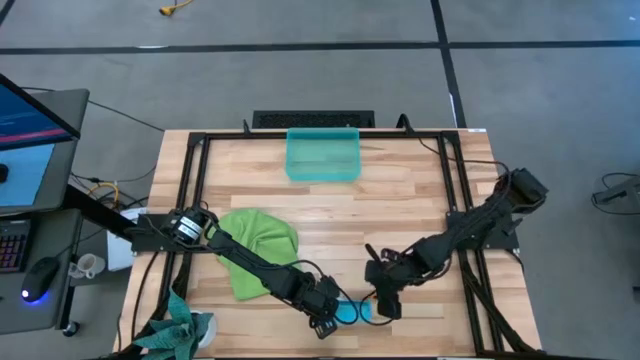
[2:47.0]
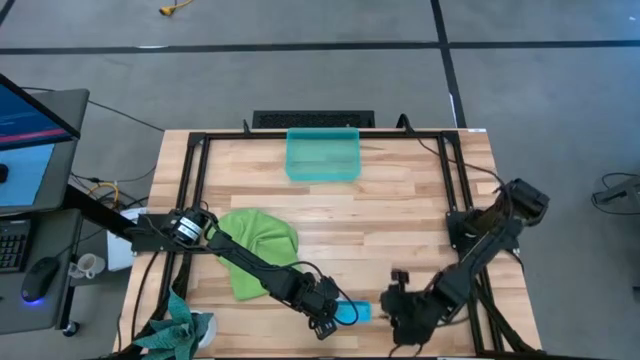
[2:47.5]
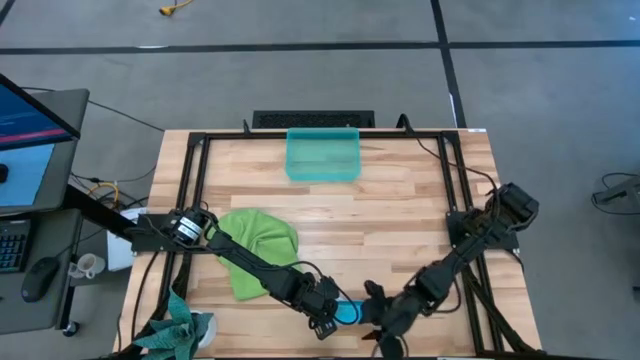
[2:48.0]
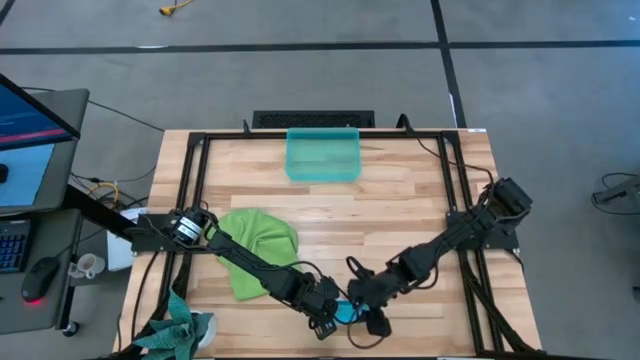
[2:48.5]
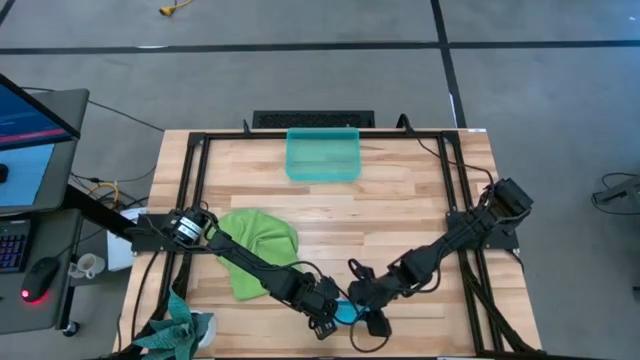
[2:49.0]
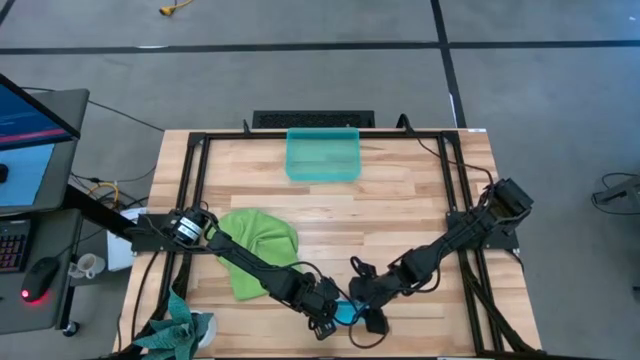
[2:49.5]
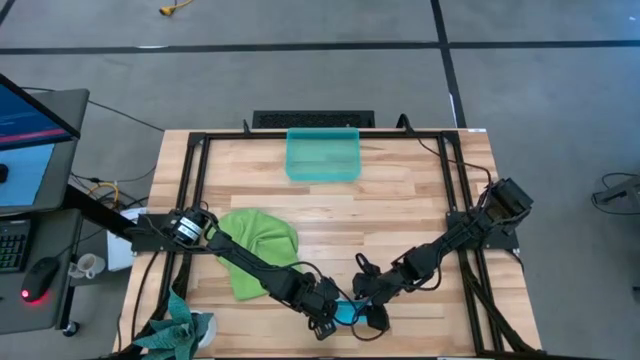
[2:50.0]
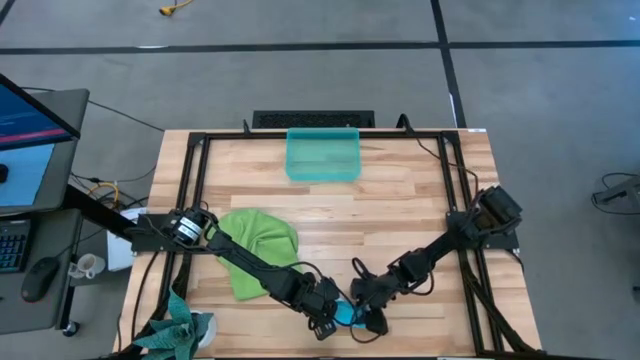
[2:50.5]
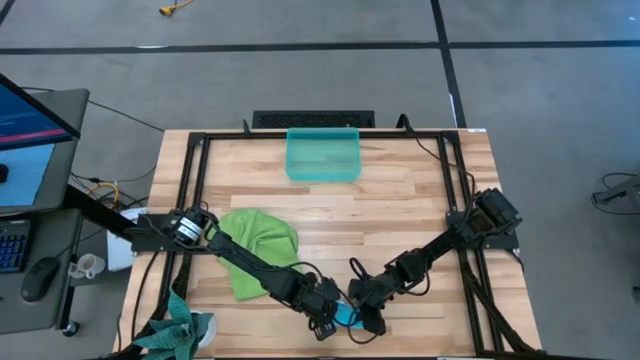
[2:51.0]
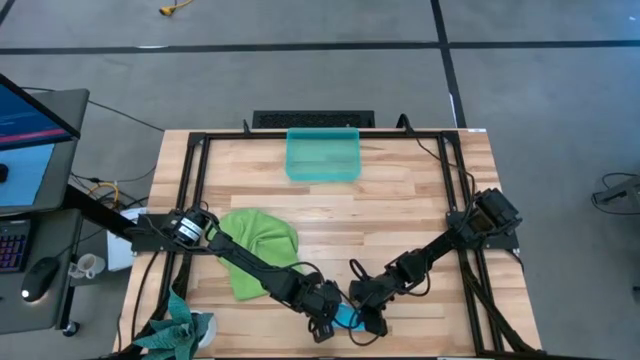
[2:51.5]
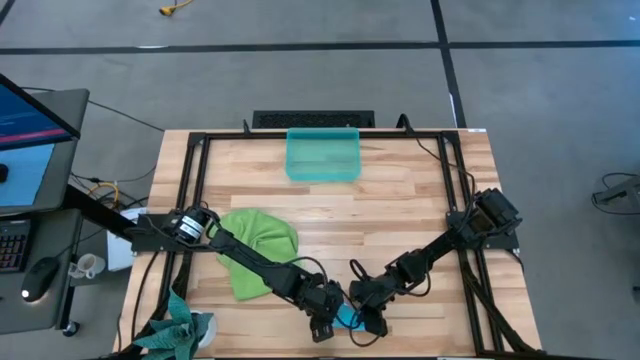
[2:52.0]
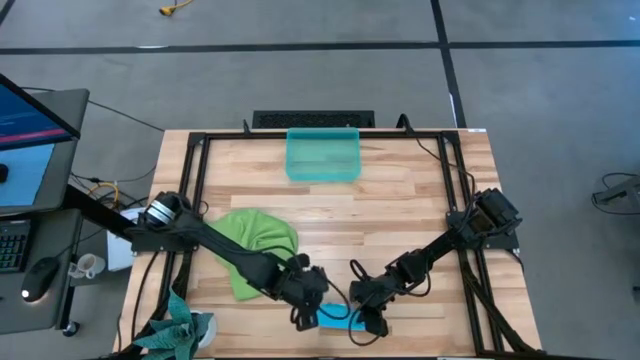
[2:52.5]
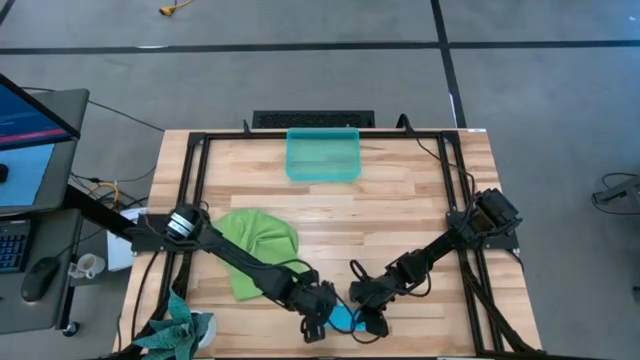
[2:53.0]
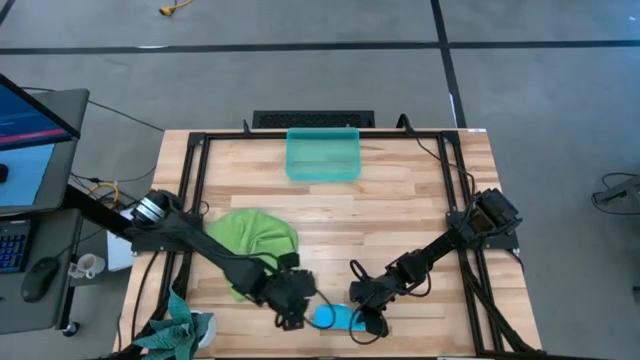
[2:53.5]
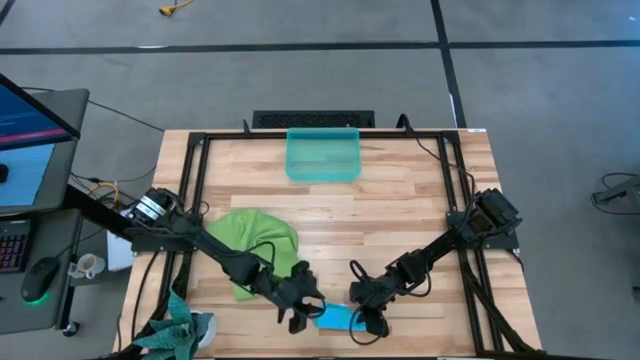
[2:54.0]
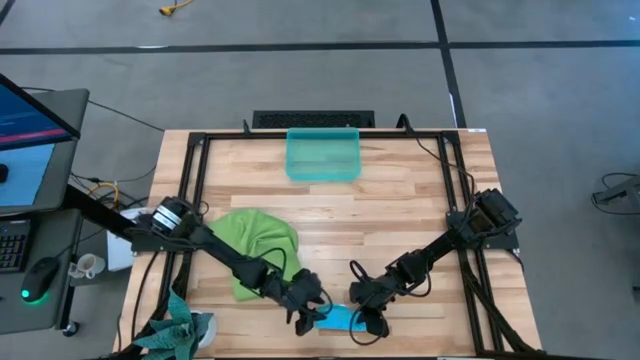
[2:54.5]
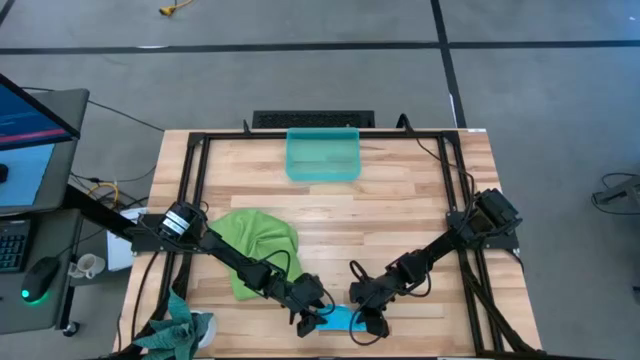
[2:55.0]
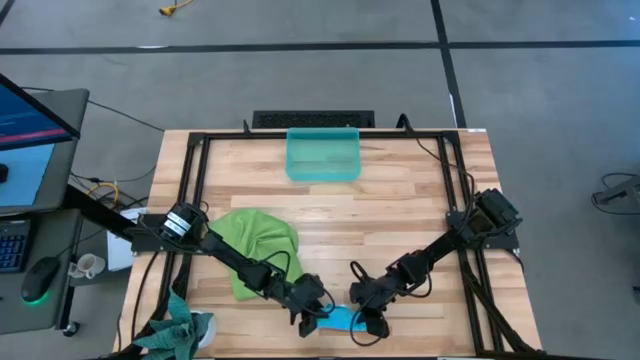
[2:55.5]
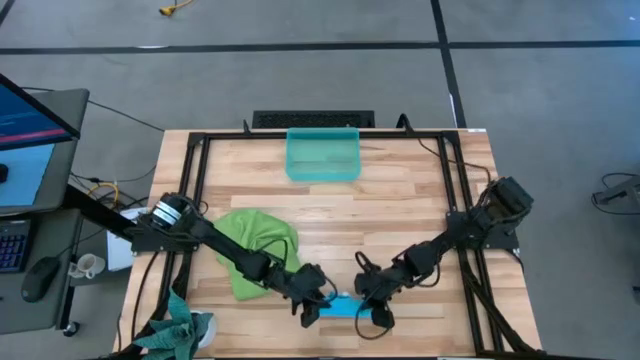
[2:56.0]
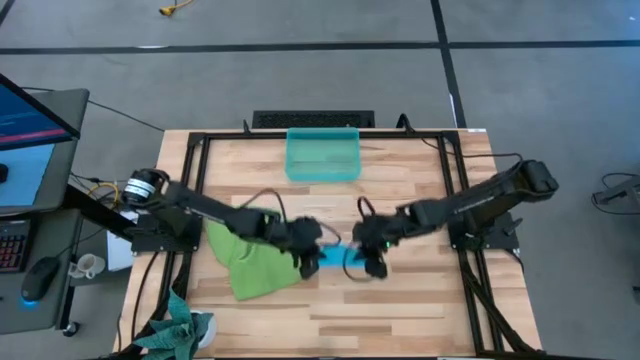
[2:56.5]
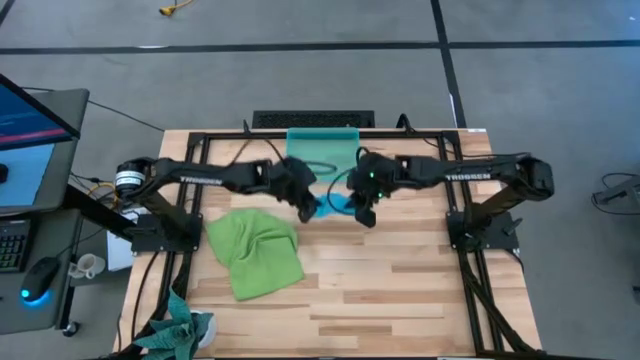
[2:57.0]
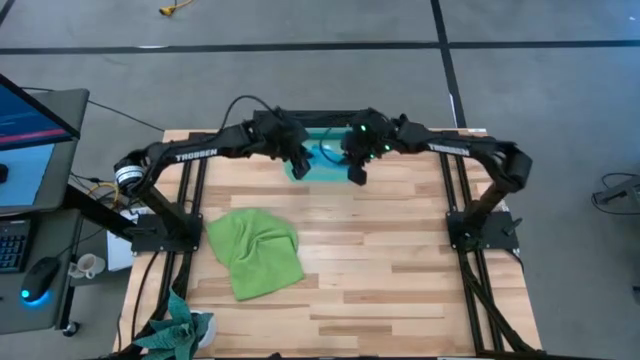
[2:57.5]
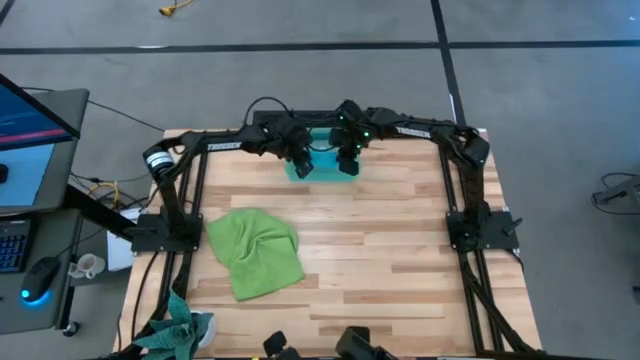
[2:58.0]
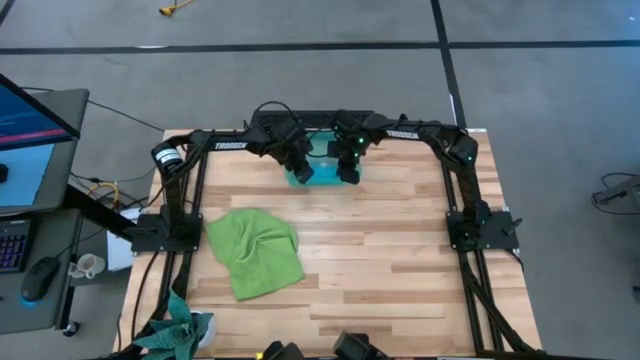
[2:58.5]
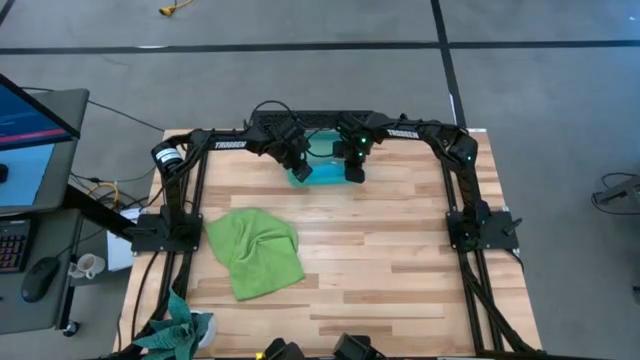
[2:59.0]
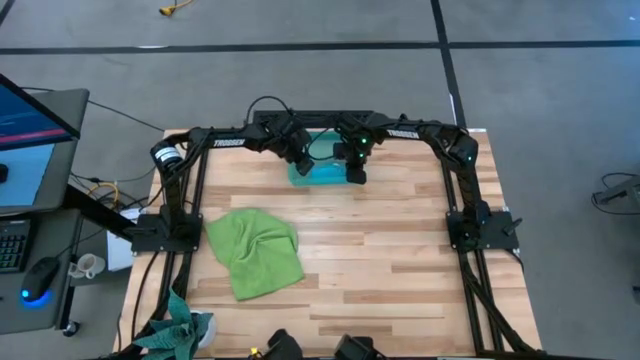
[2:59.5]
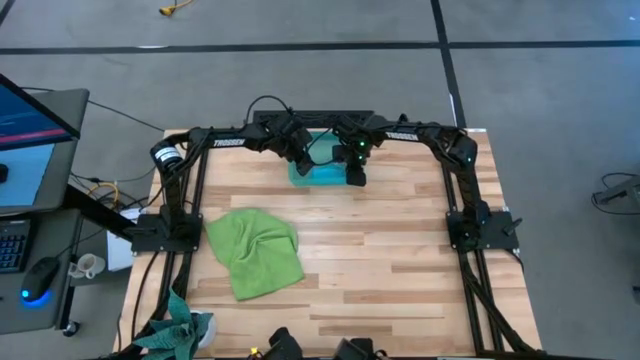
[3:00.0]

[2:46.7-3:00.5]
Task: Roll microfiber towels into tight, uniform cylinder then place into a basket
Put the blue microfiber cloth into the blue bin

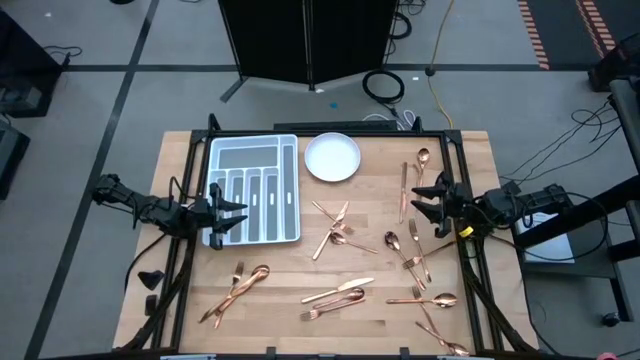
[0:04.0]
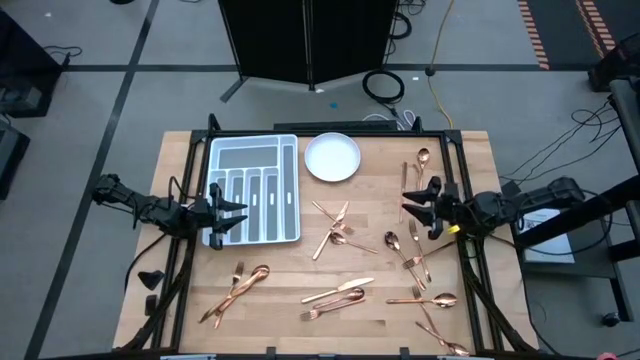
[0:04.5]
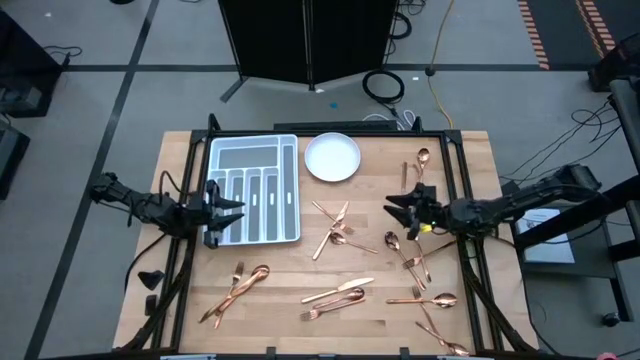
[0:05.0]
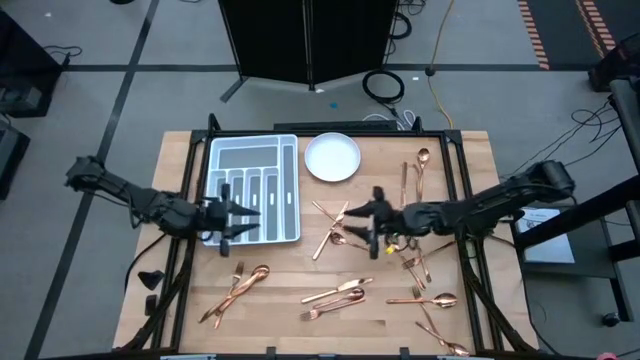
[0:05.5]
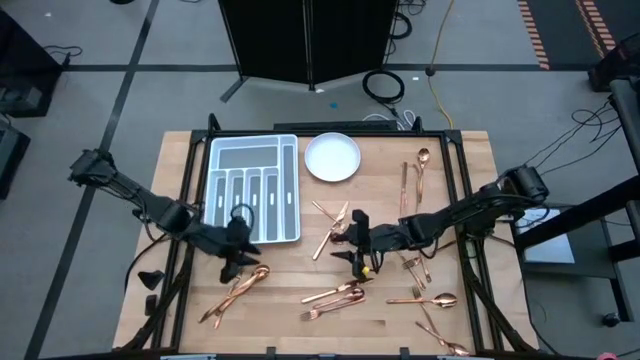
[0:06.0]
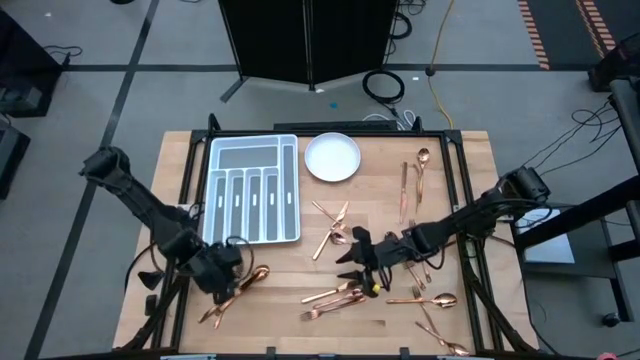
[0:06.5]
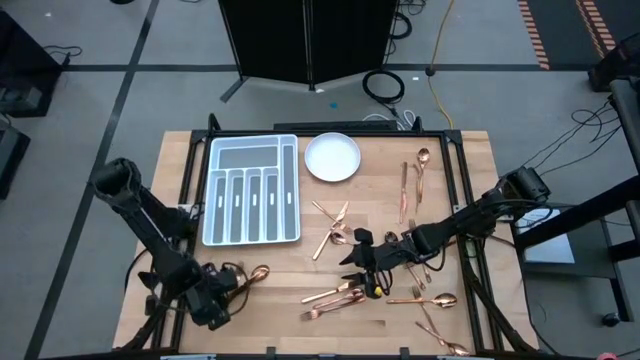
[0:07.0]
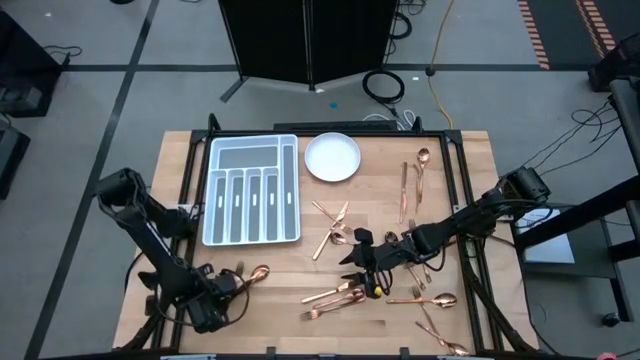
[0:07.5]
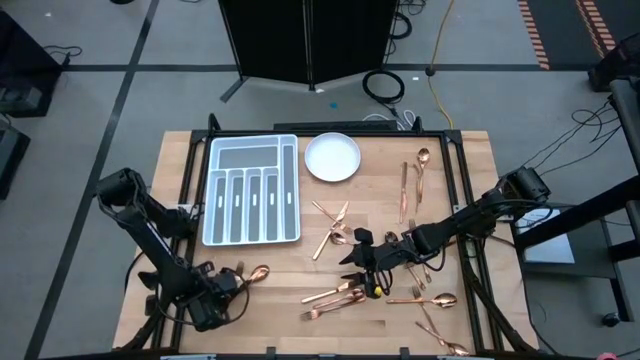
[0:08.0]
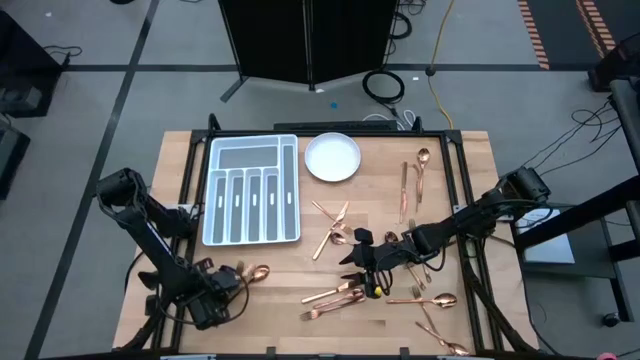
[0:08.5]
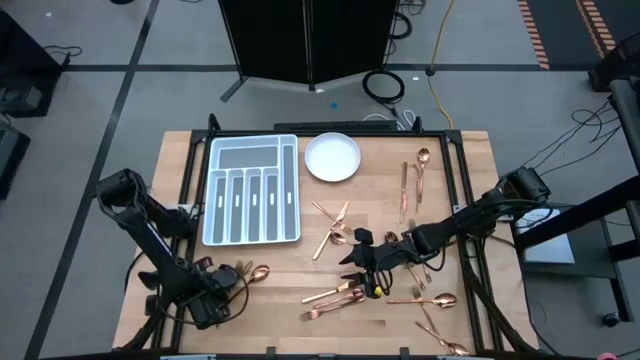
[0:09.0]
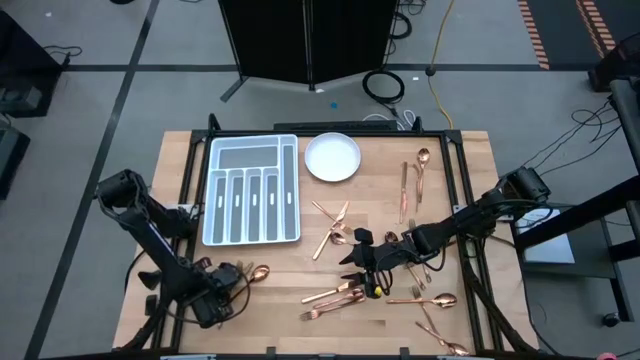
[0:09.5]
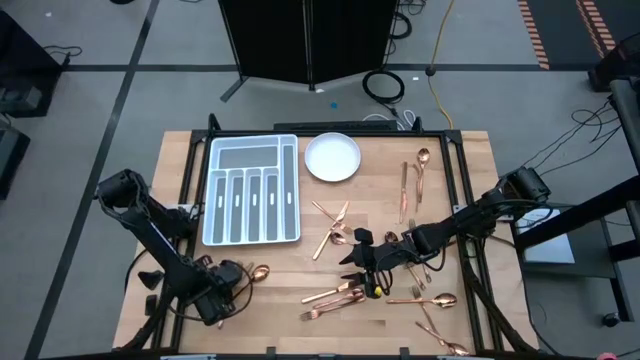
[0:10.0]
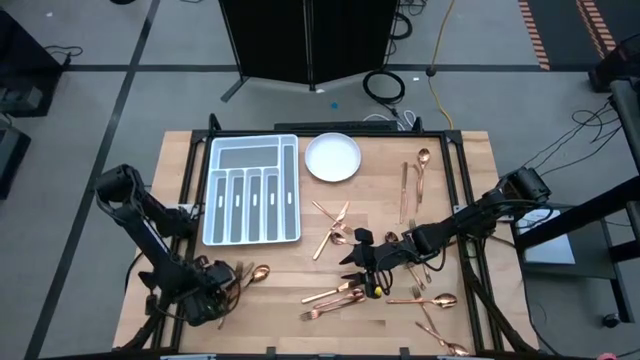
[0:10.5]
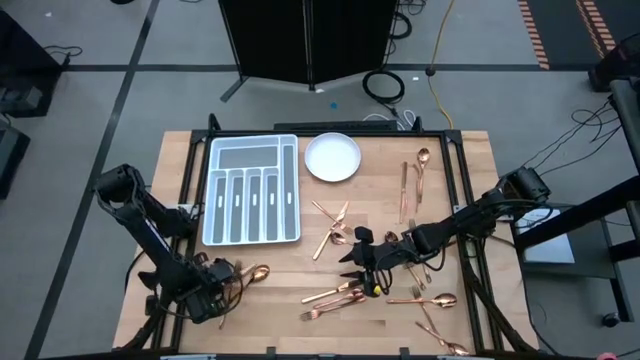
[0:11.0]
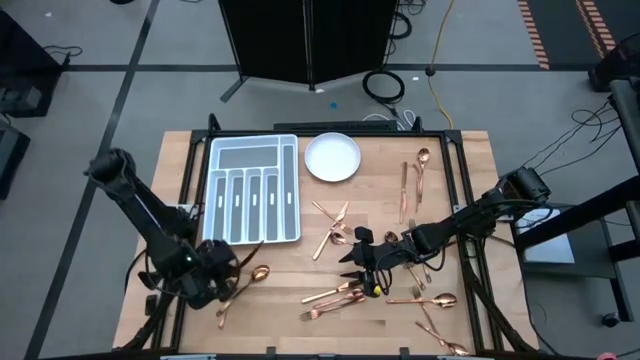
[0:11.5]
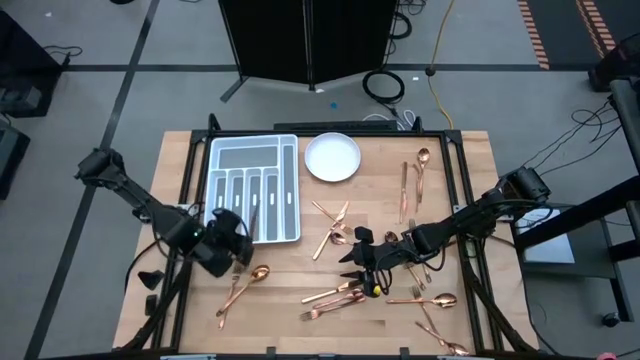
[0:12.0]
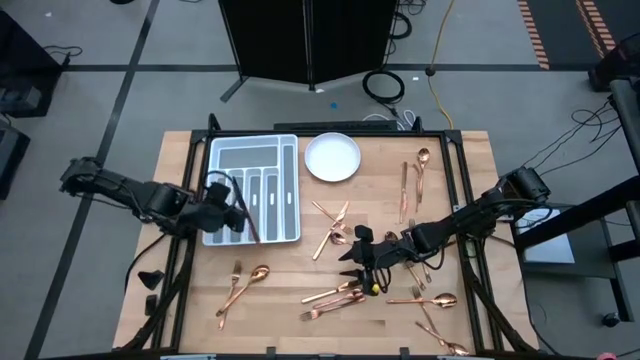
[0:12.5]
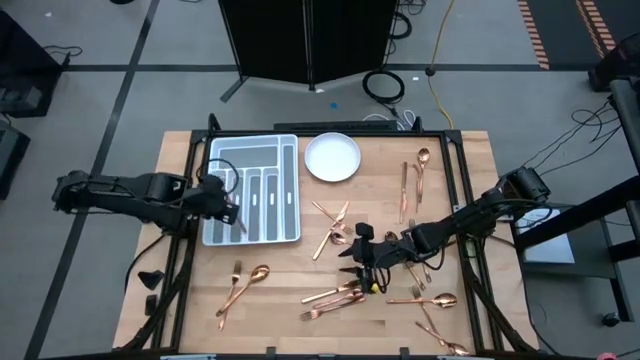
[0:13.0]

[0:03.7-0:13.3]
Task: Sort silverware
Put the knife on the silverware tray
